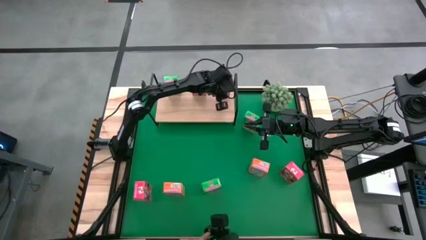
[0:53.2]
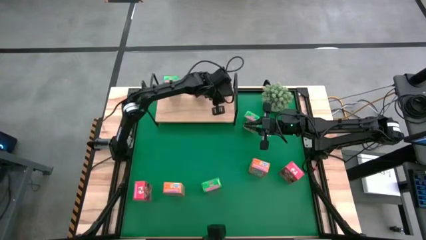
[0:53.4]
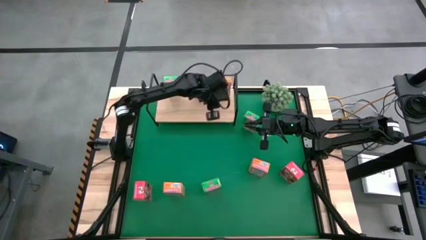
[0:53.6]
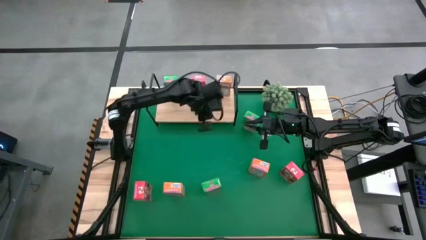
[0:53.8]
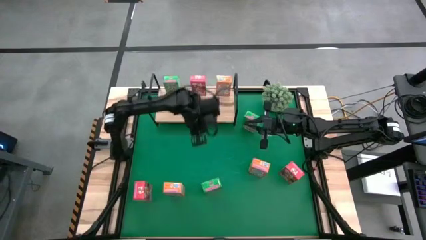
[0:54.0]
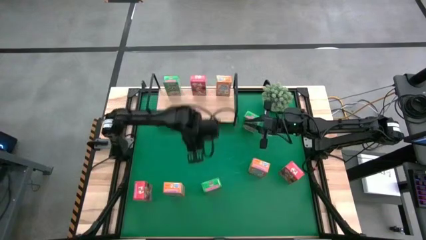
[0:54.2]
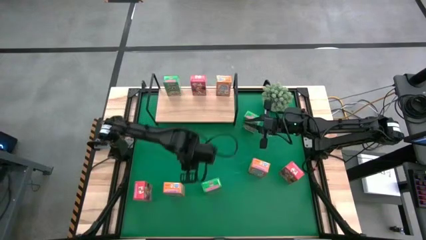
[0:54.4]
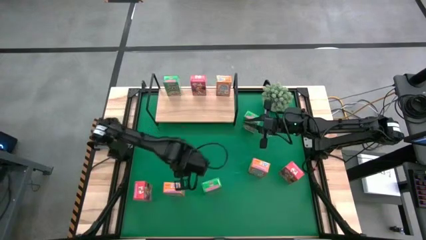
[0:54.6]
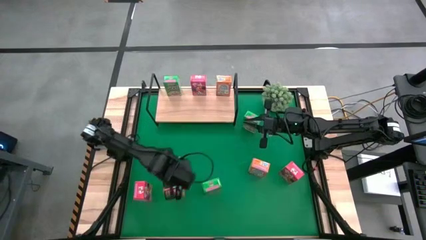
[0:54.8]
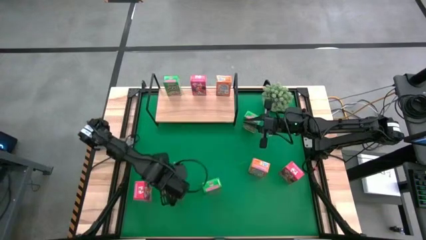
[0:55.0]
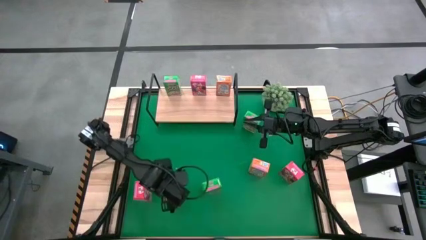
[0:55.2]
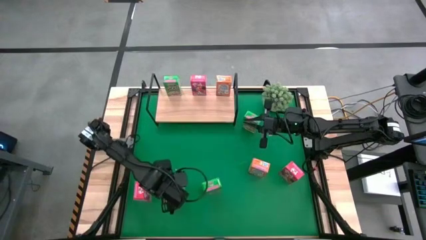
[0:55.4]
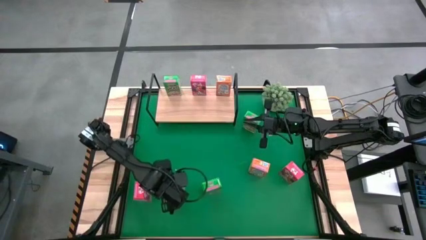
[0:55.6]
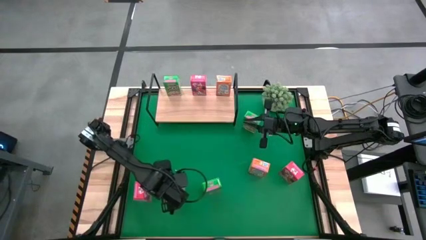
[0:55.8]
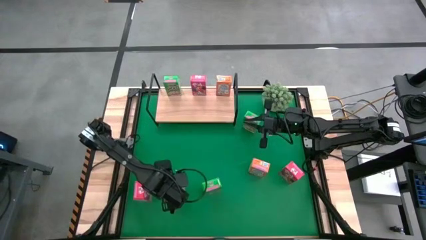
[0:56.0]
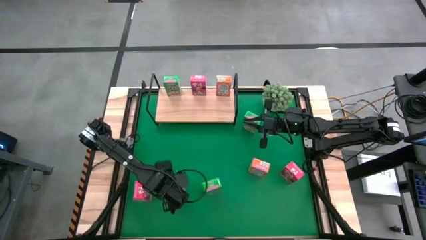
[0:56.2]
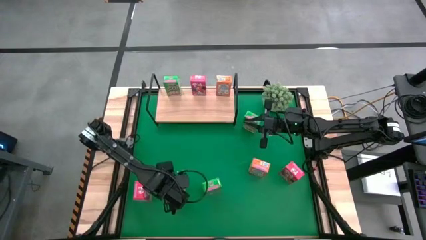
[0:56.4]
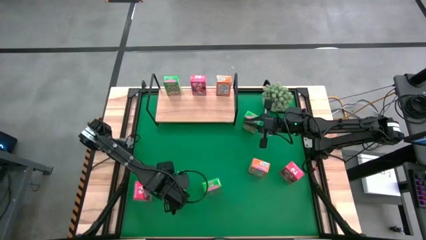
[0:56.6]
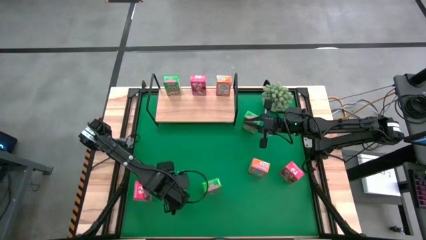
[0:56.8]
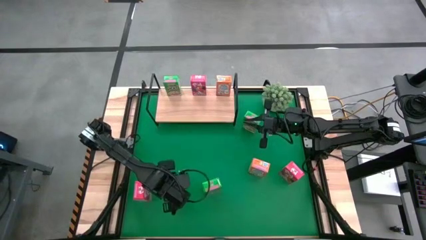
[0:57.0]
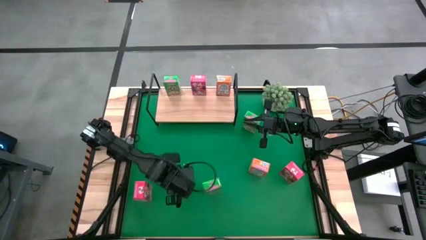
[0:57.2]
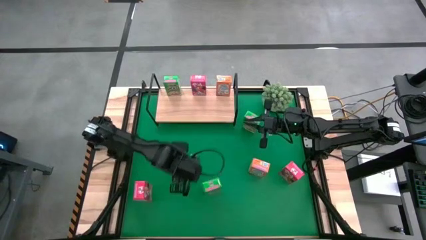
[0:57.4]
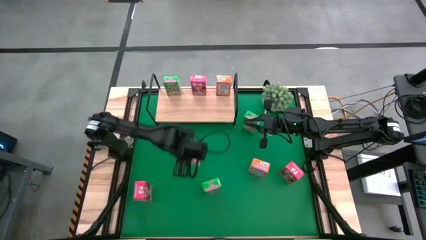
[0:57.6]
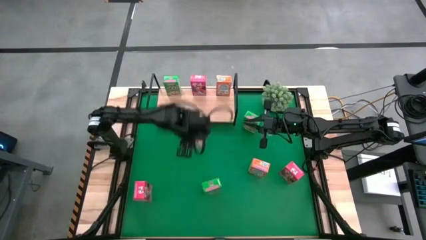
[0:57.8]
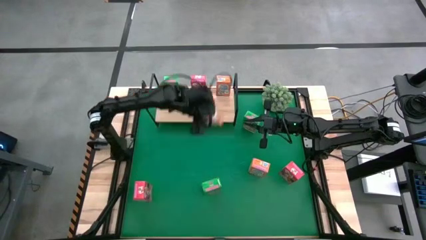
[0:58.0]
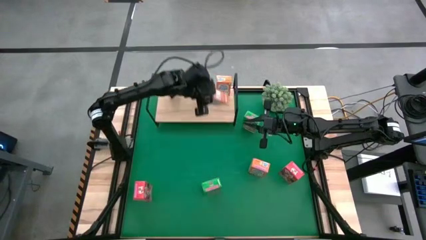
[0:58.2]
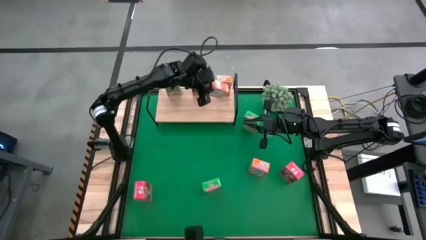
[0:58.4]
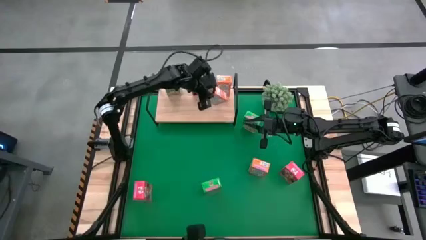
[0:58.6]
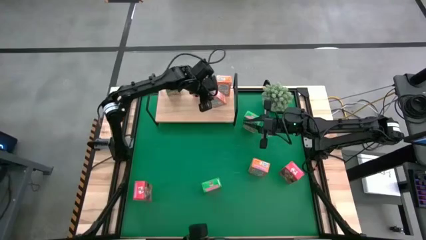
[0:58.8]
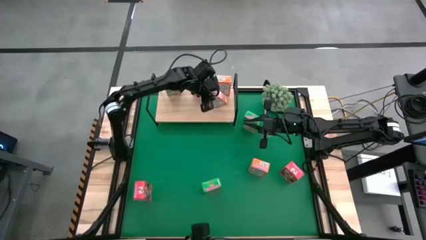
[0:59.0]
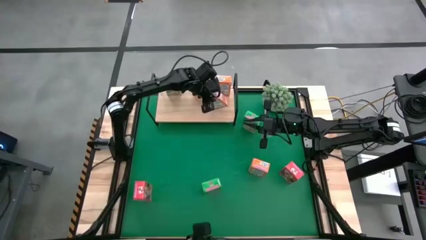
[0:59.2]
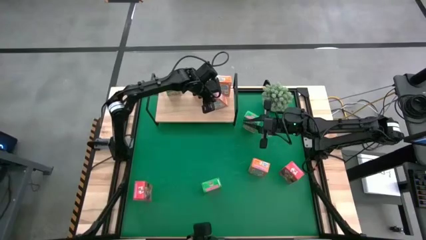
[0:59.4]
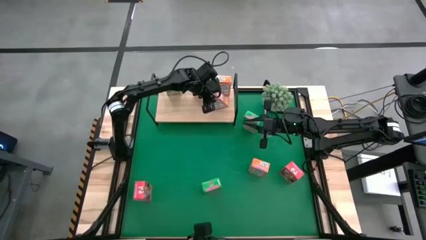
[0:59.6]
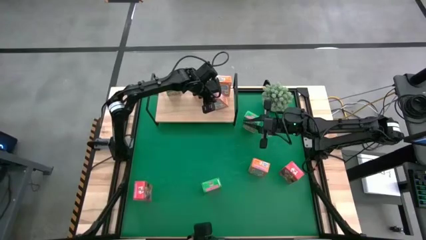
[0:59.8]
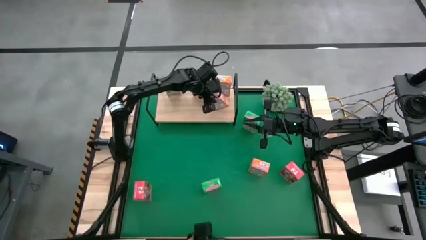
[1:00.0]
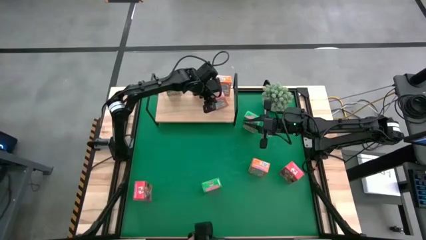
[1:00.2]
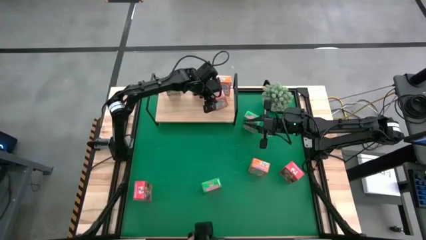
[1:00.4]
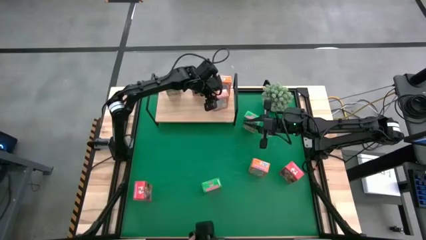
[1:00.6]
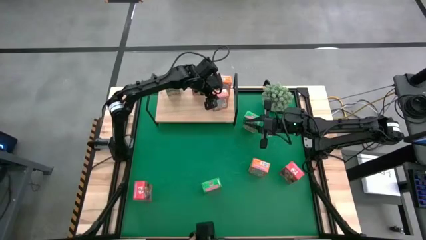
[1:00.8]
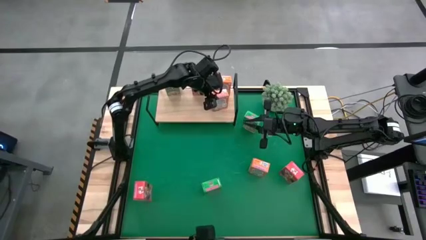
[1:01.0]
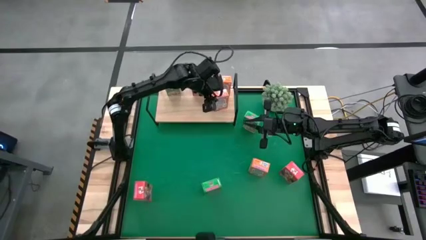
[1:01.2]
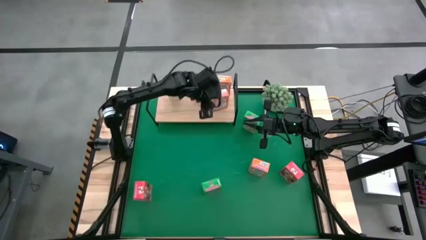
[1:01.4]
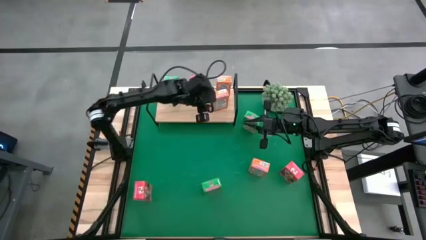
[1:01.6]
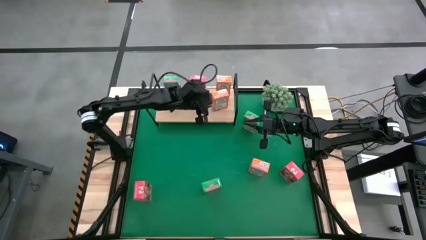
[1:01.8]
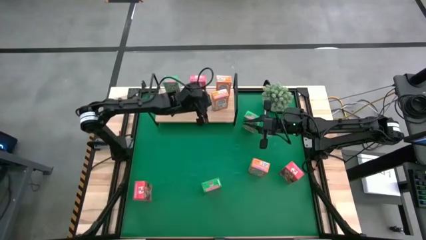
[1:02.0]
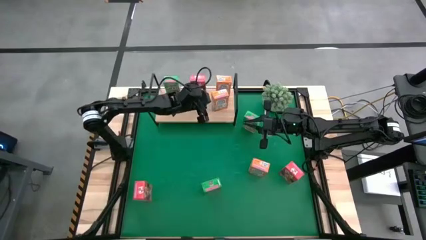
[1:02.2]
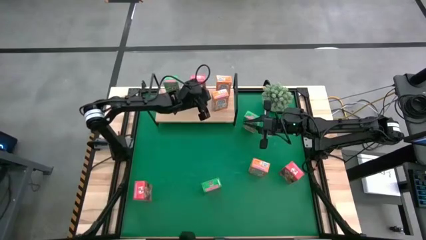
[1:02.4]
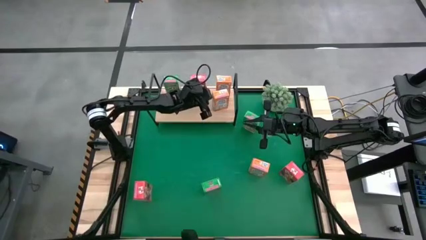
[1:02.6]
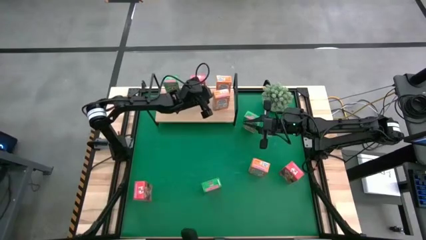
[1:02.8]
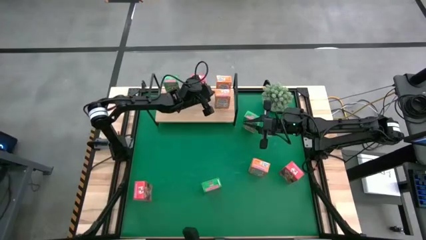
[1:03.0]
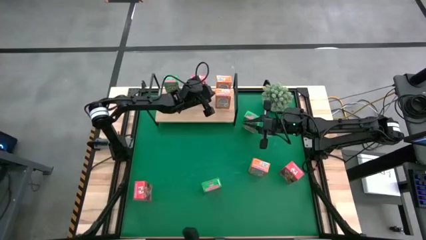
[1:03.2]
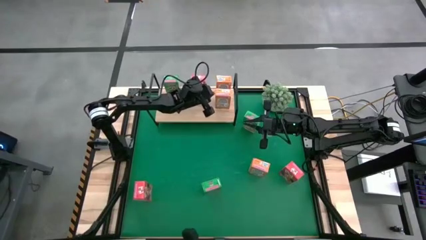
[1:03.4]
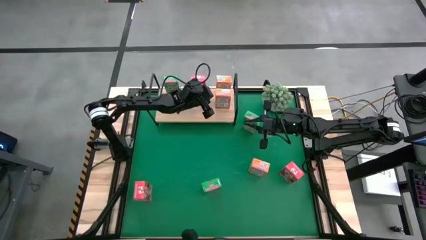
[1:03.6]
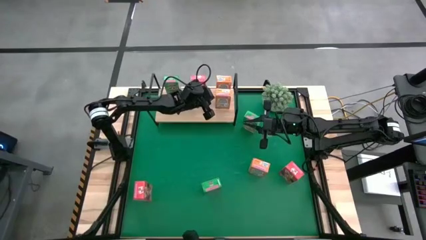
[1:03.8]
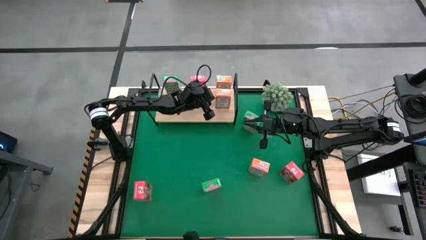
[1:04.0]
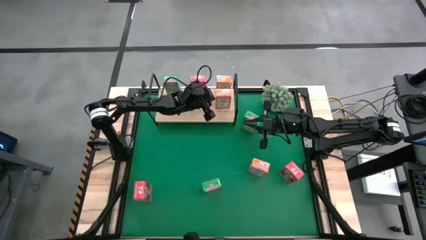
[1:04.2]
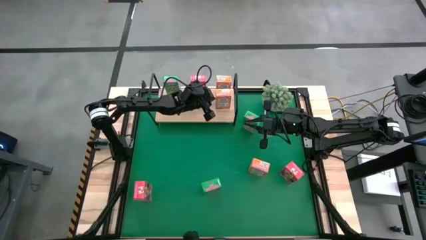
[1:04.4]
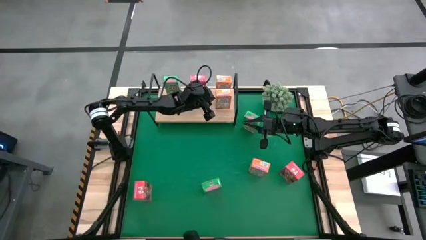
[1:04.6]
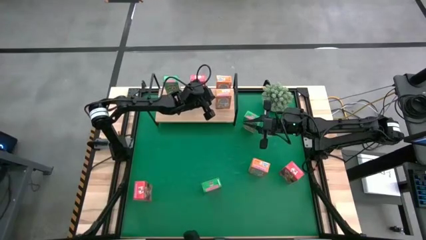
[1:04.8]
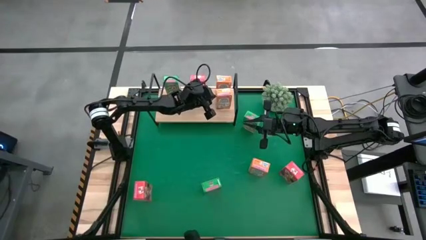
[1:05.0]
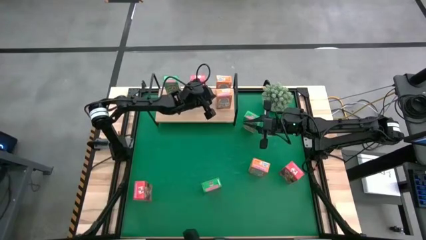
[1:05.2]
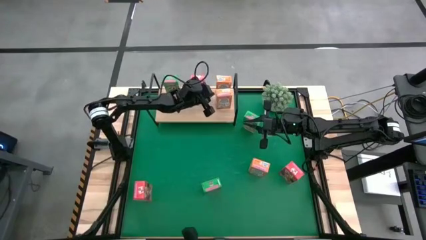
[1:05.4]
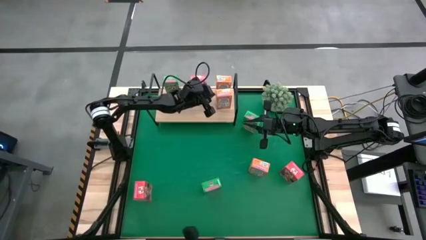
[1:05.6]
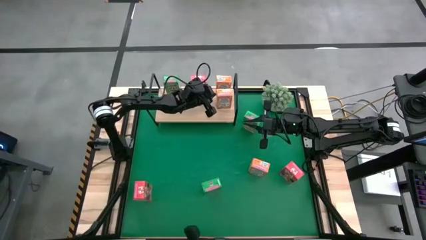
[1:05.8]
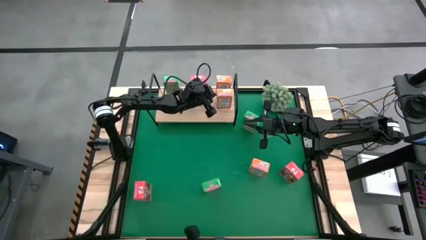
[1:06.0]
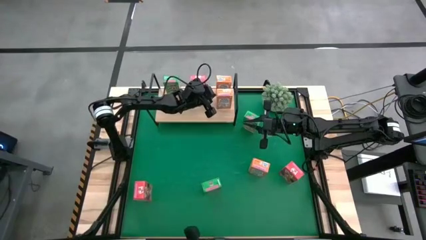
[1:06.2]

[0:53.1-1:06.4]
Task: Stack cereal on shelf
Put the left orange cereal box aligned with the other orange cereal box on the shelf

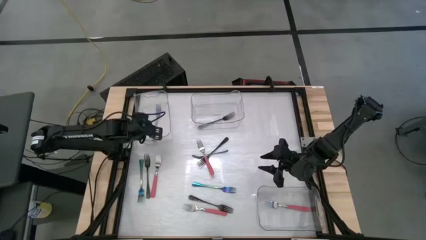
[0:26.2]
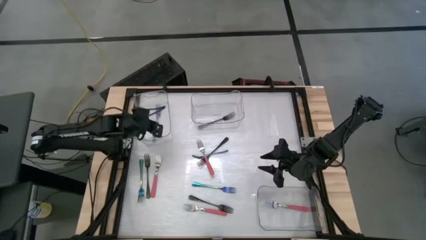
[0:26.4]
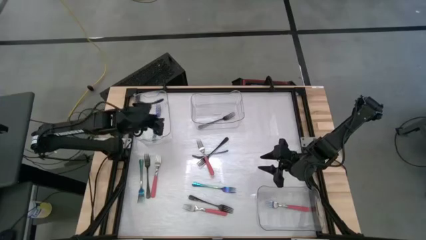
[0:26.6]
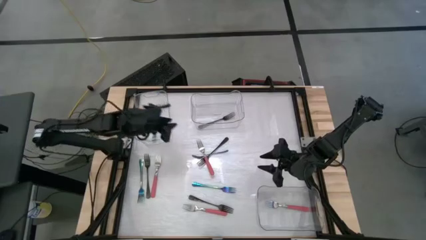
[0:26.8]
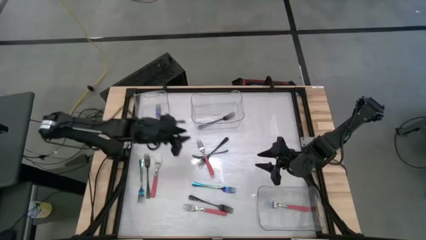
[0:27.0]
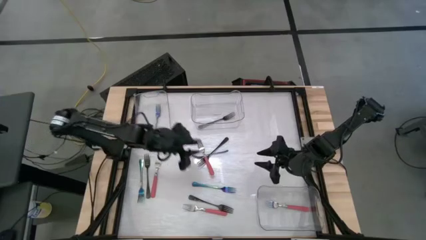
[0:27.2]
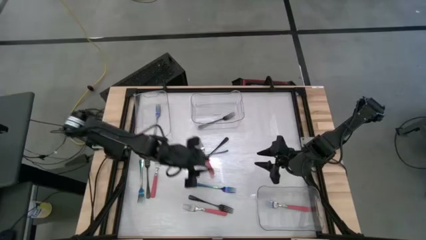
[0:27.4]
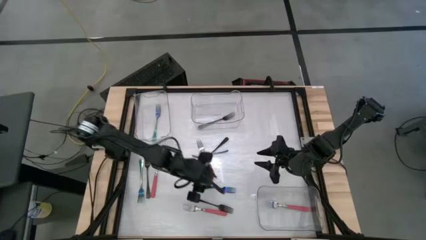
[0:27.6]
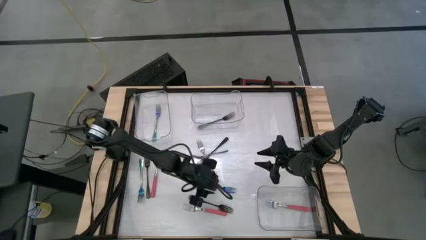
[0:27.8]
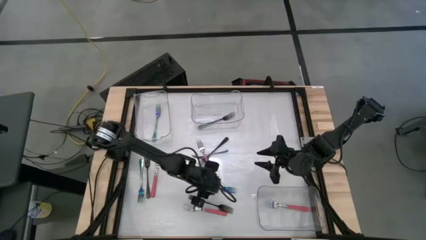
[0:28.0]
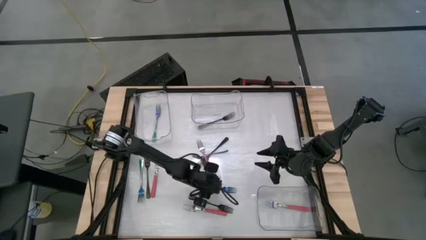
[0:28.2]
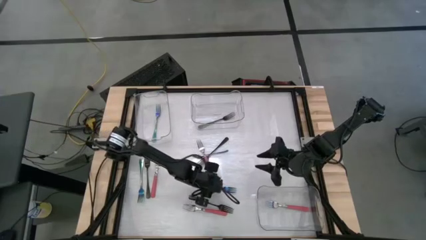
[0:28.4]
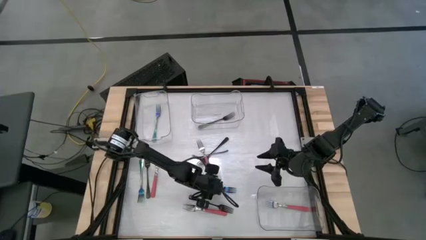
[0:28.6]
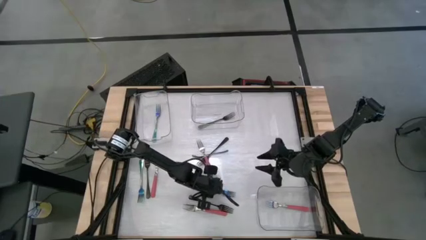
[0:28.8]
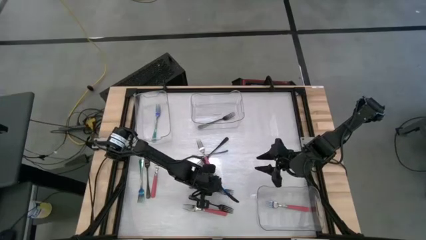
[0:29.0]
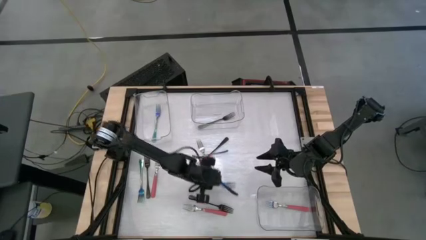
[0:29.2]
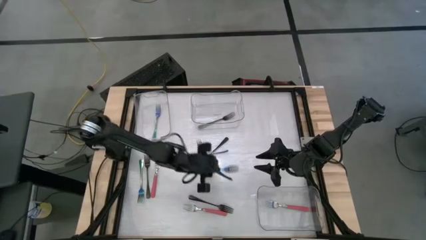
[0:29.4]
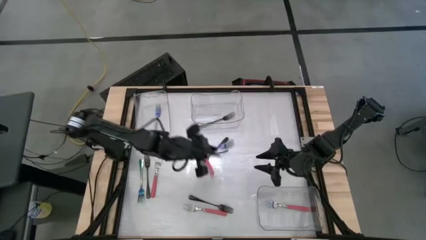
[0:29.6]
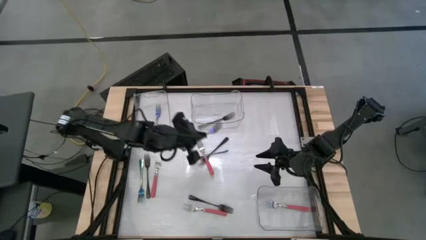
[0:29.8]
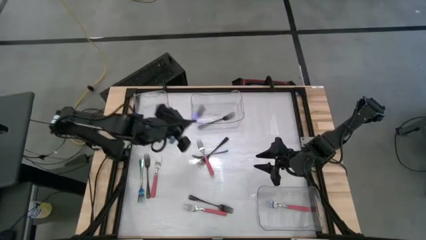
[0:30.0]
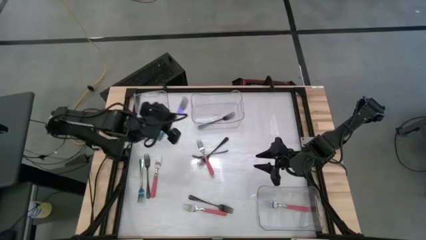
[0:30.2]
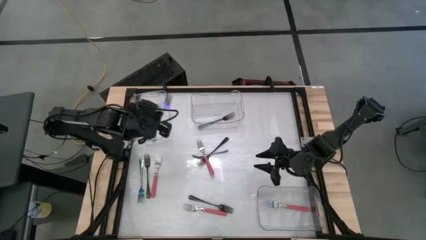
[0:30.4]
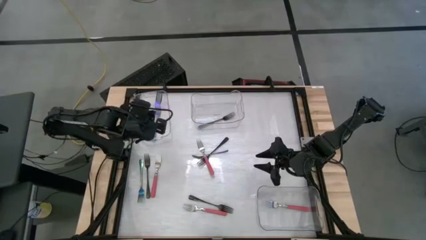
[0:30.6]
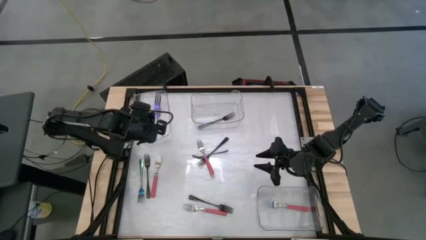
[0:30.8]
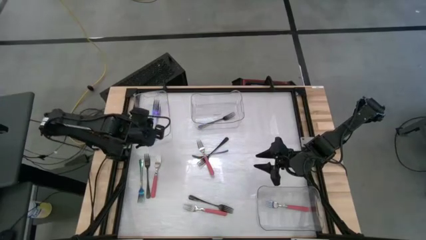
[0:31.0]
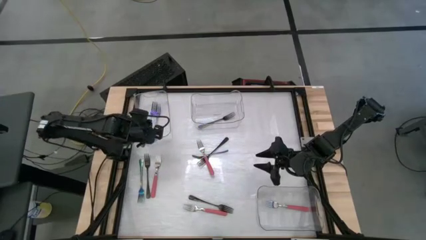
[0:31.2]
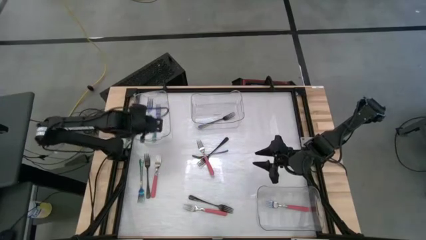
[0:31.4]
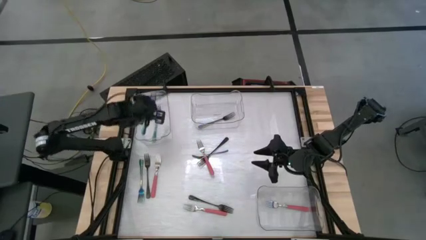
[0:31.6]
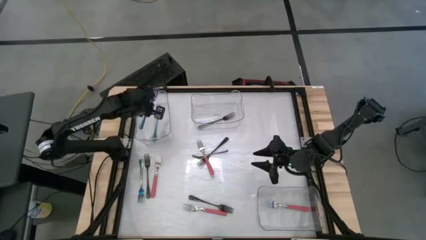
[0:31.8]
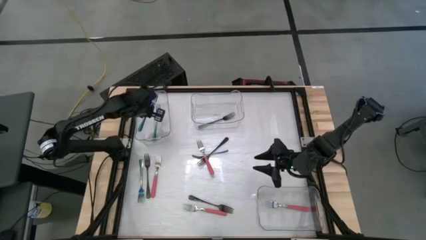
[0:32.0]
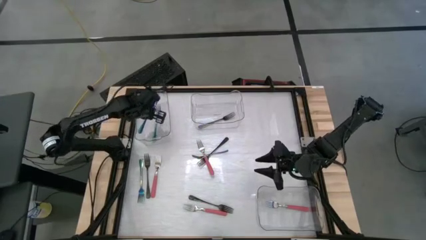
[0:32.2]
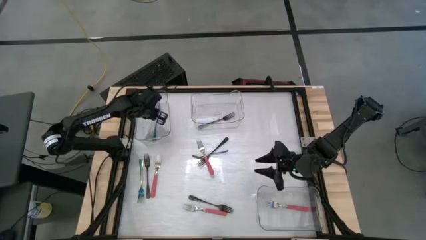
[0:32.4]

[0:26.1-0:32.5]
Task: Sort silverware by color (type)
Put the purple fork into the top left transparent bin
